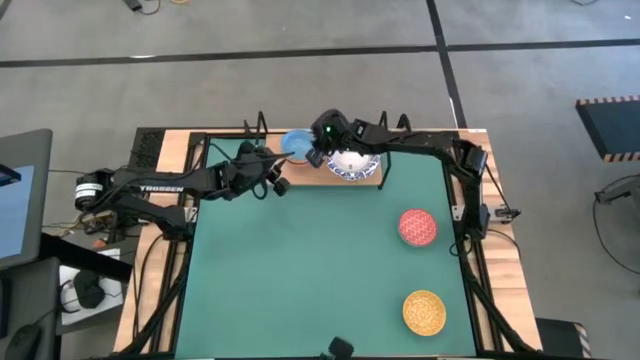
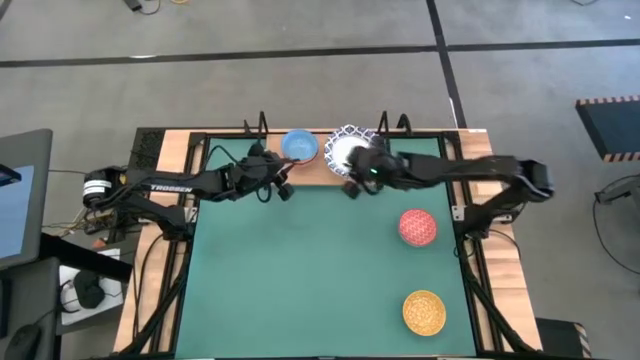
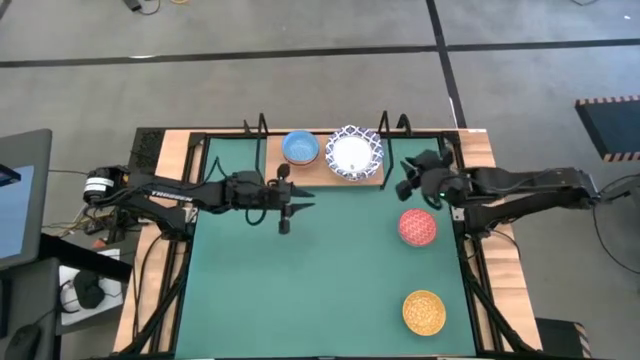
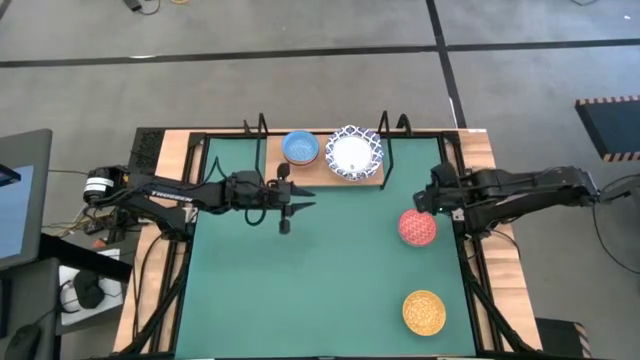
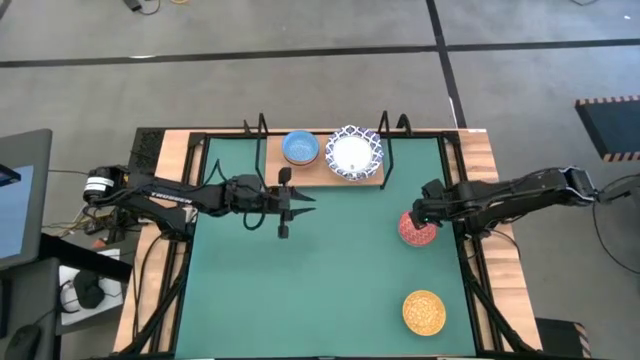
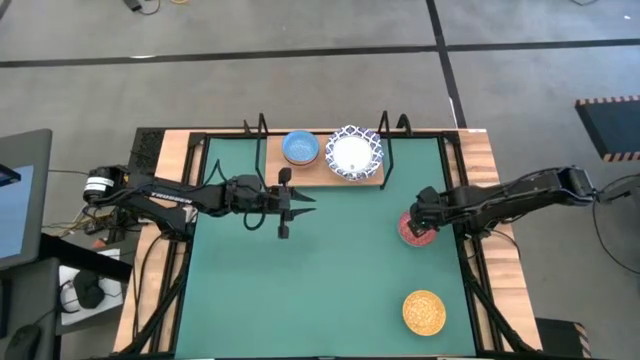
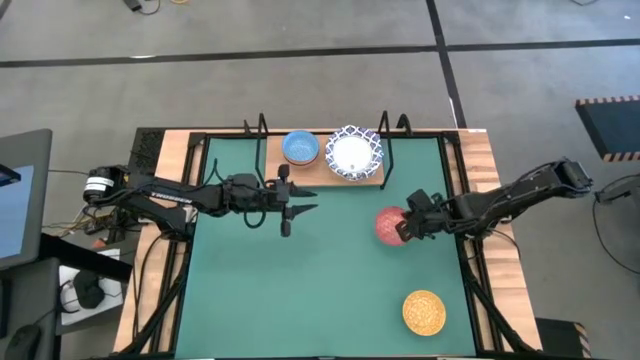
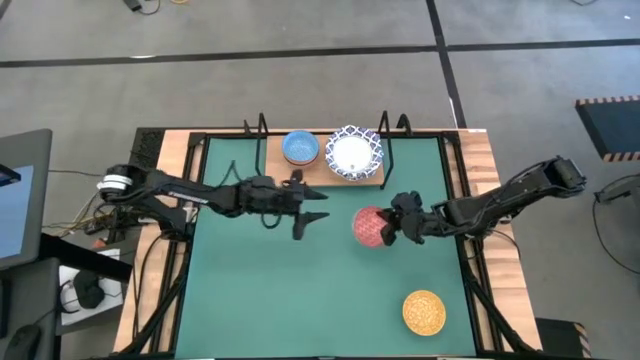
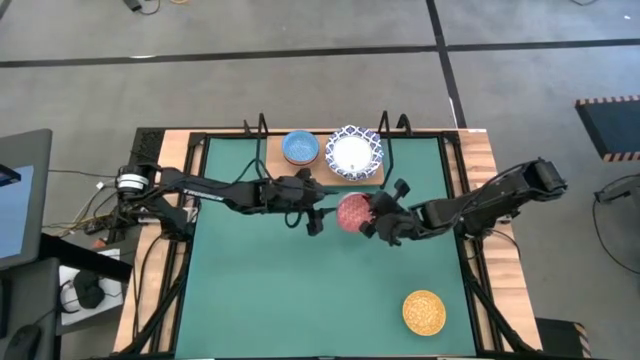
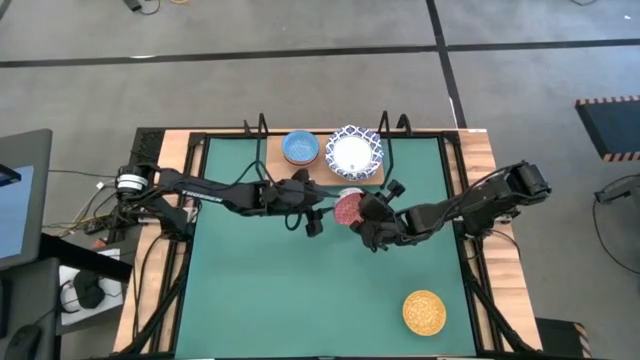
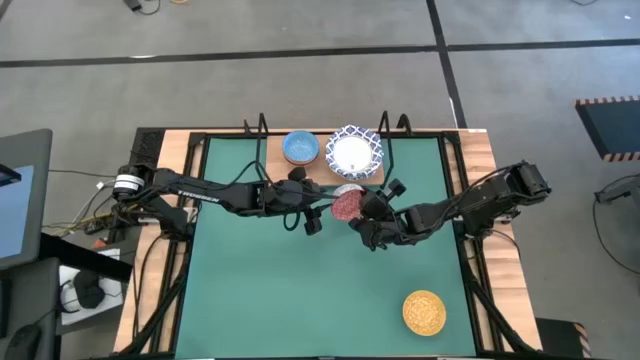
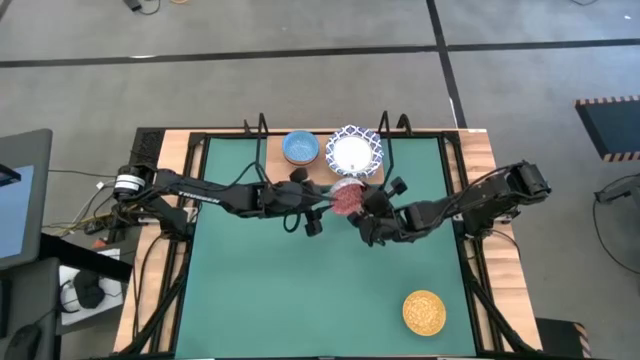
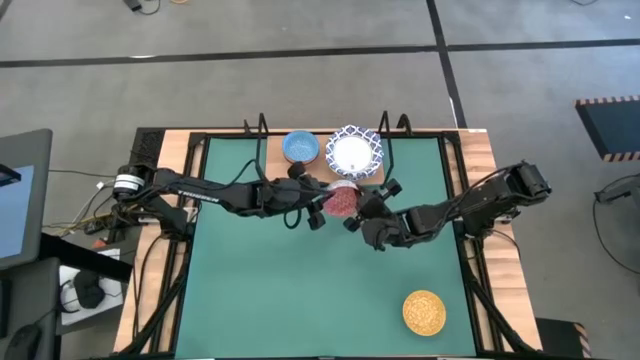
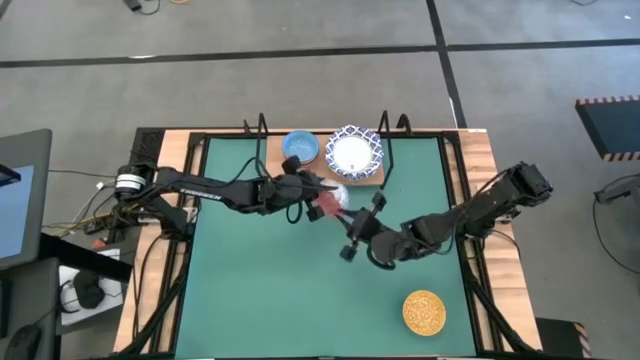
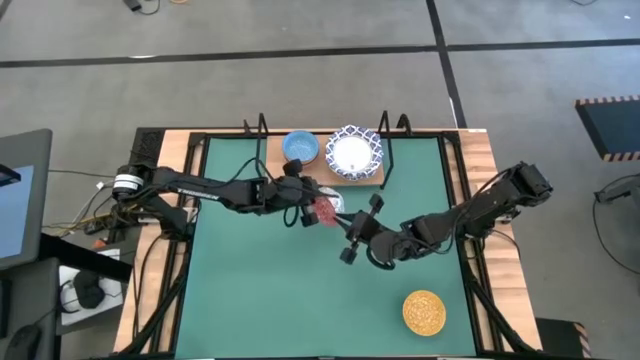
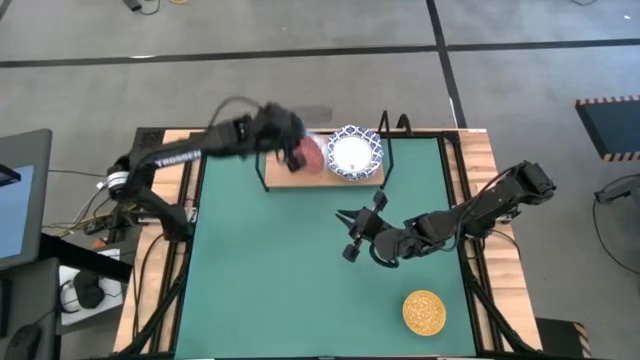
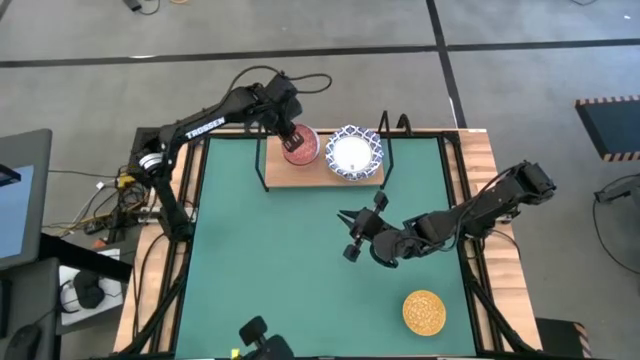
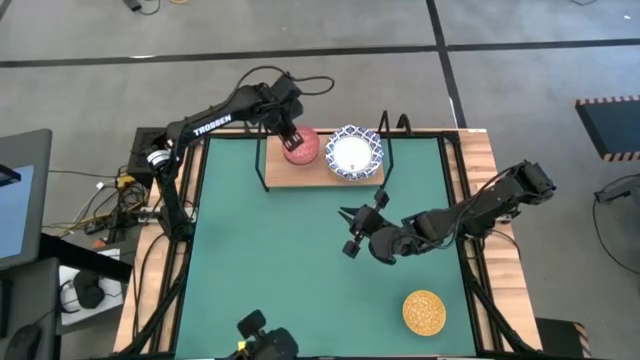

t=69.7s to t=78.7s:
Task: Place and stack bowls onto a shelf
Stack the red bowl on top of the light blue bowl on the shelf

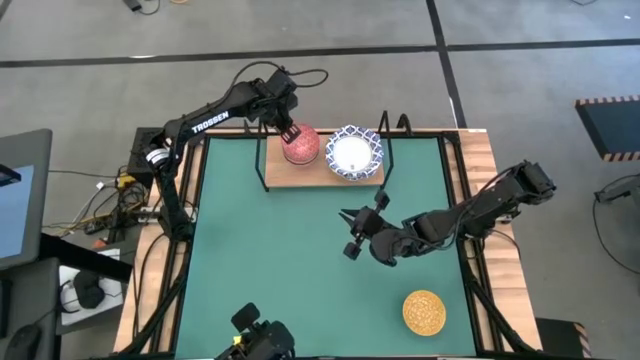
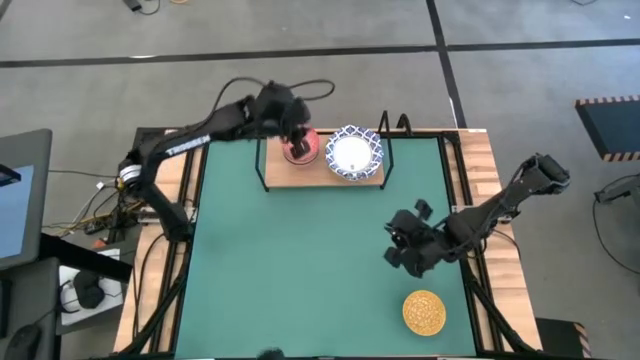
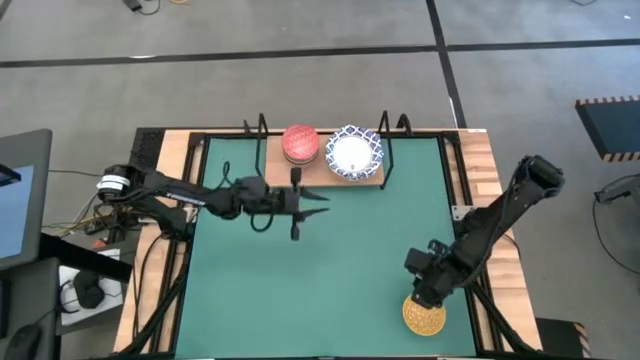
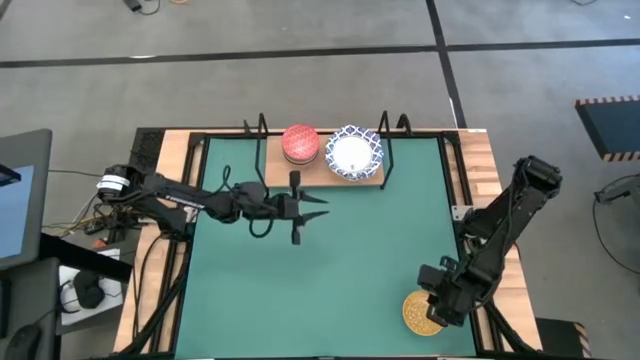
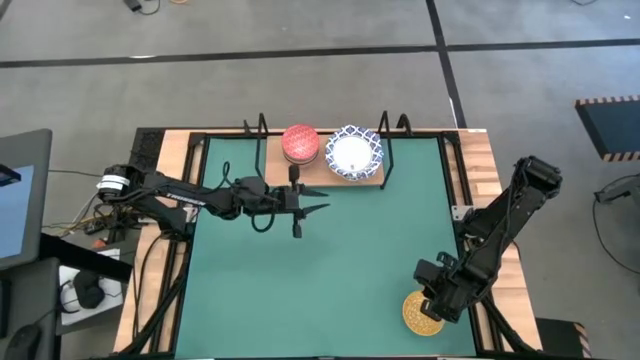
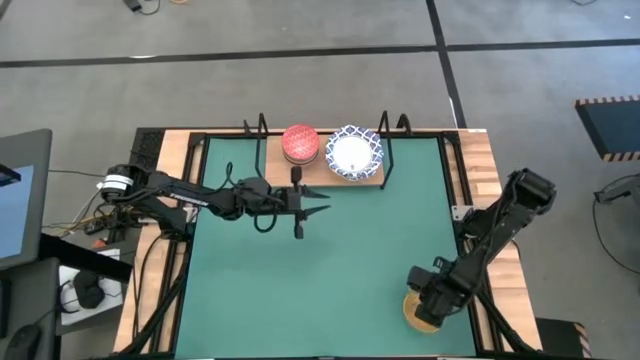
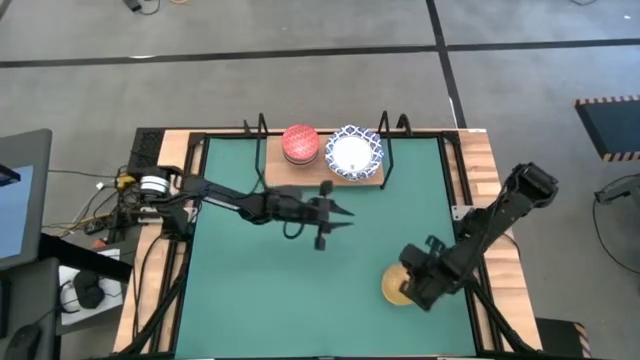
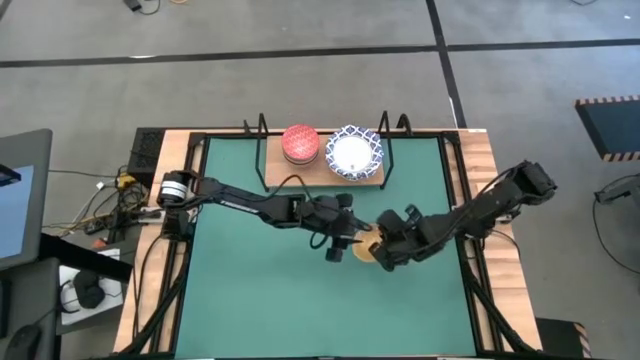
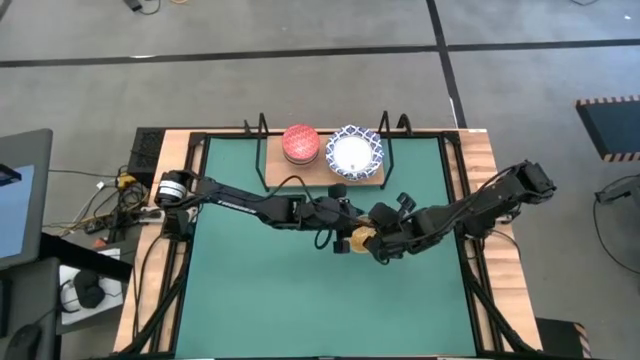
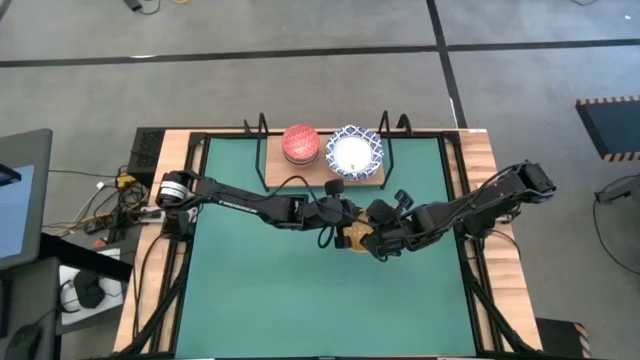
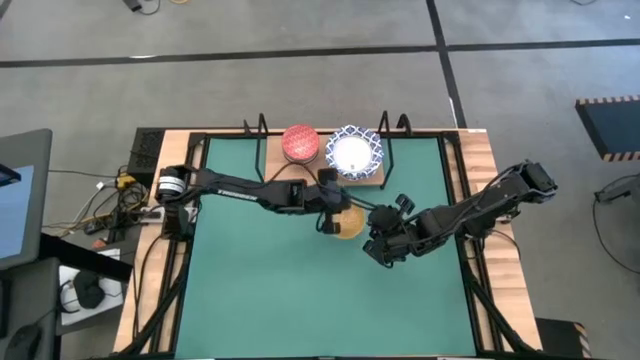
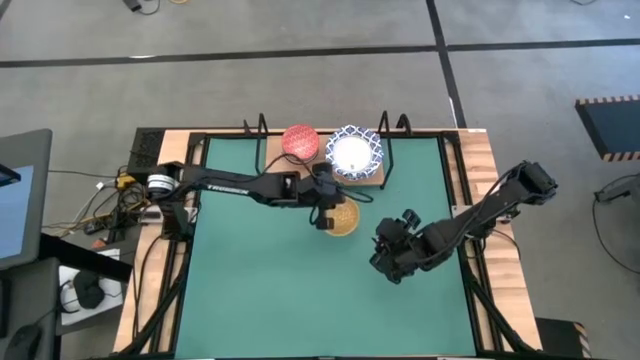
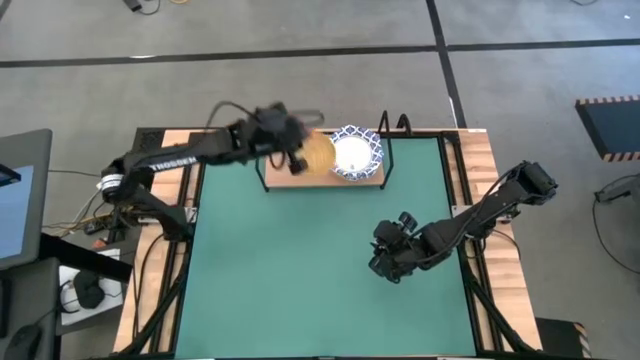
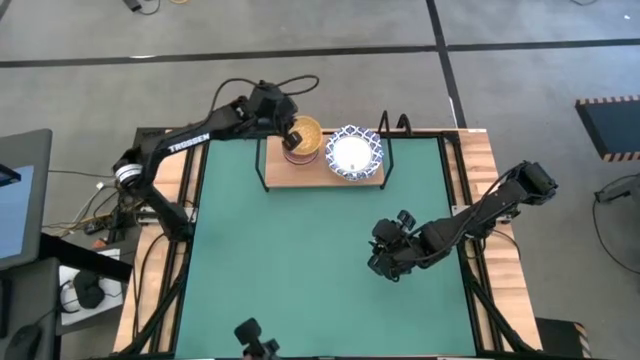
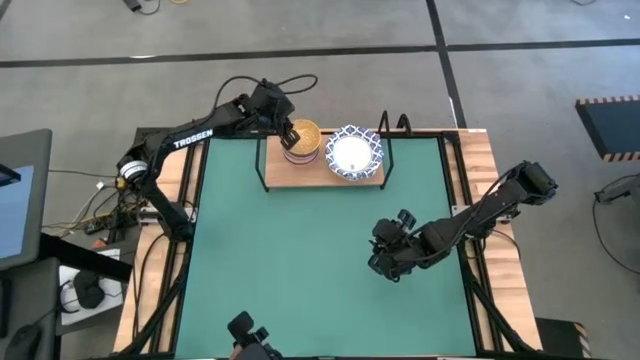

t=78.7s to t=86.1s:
Stack the yellow bowl on top of the red bowl on the shelf

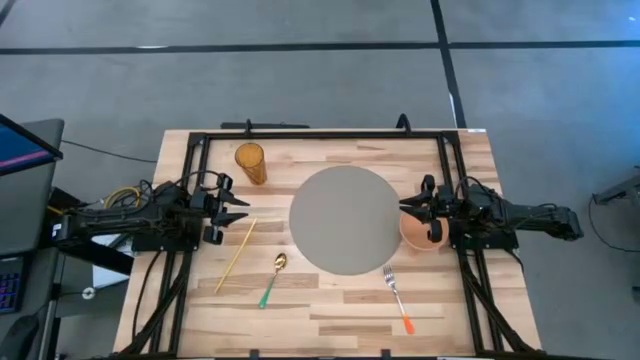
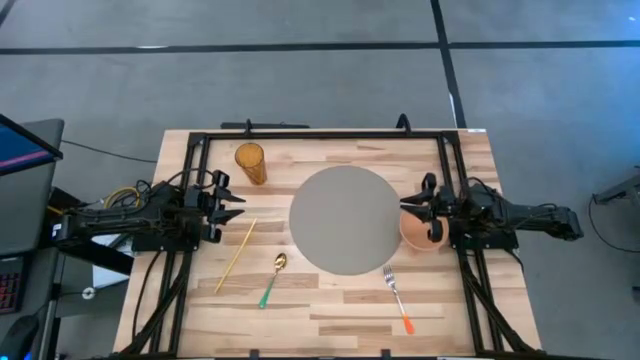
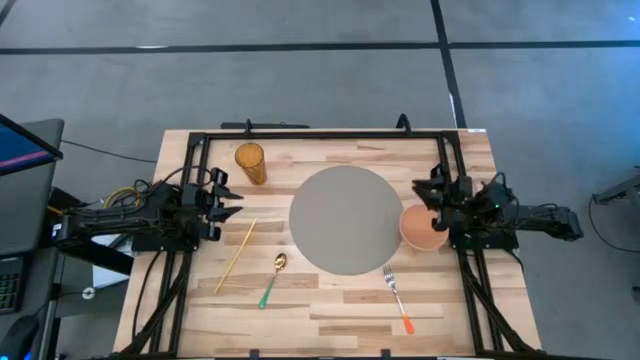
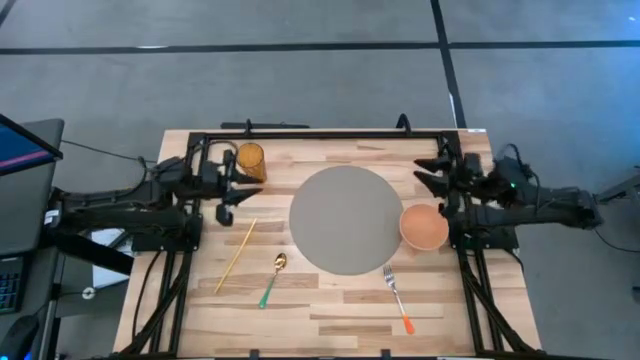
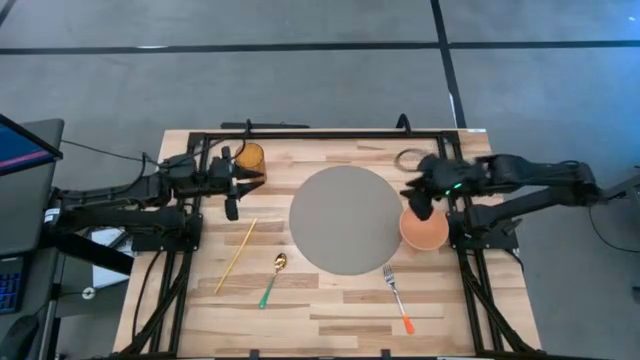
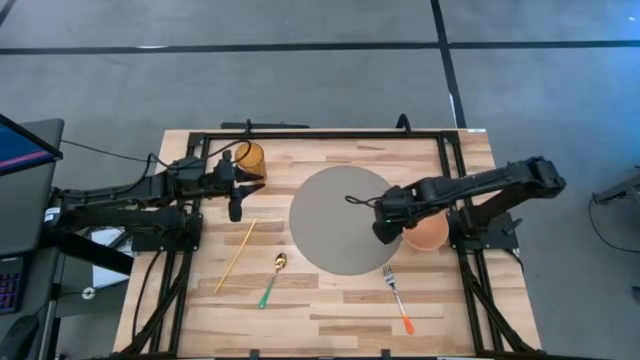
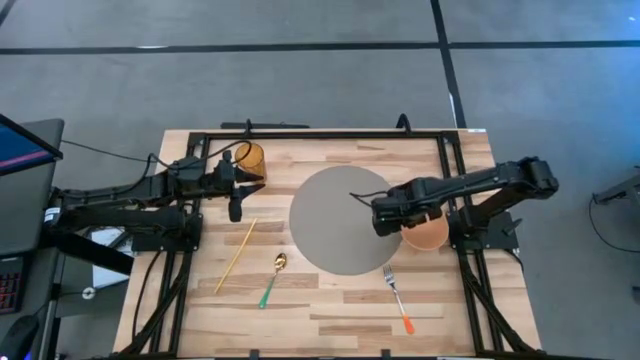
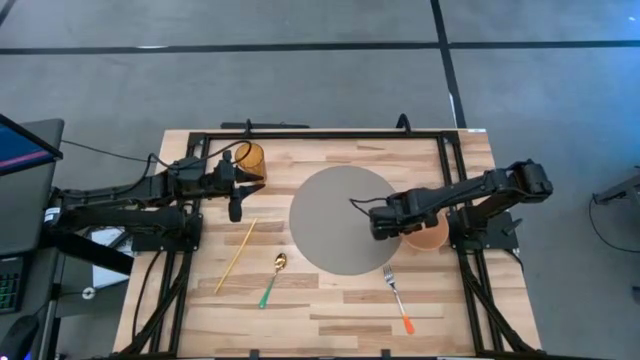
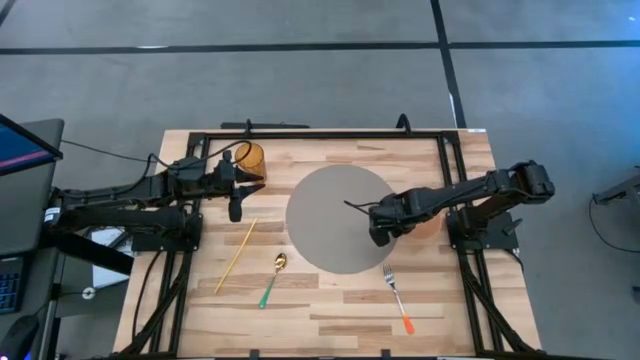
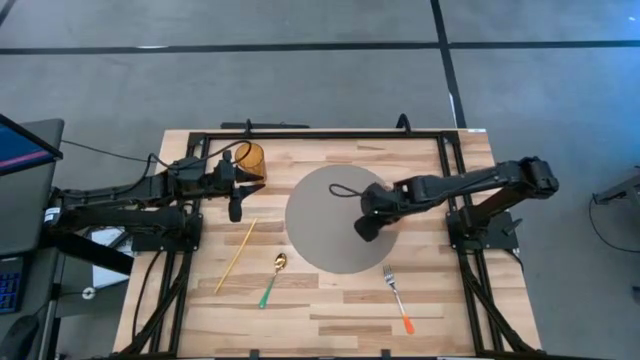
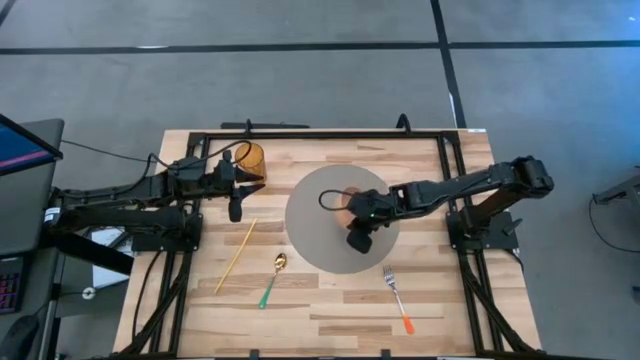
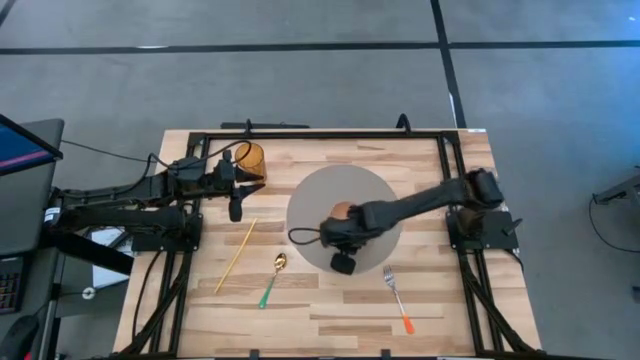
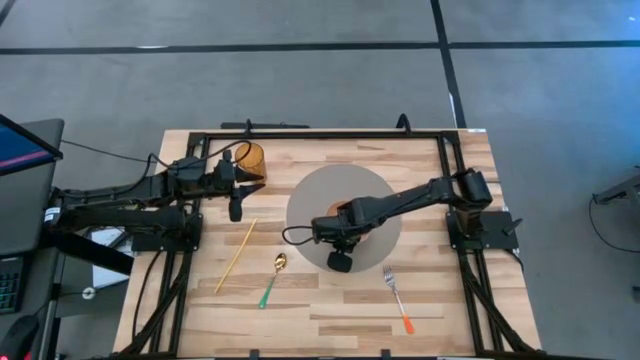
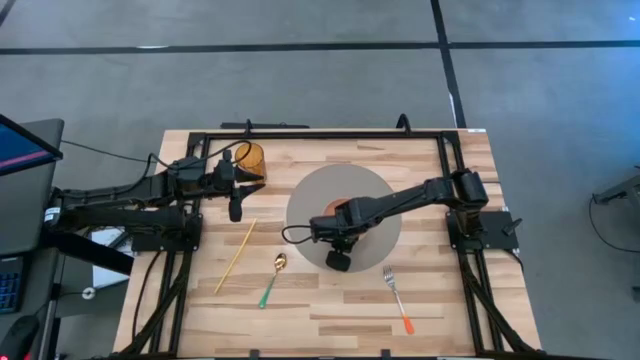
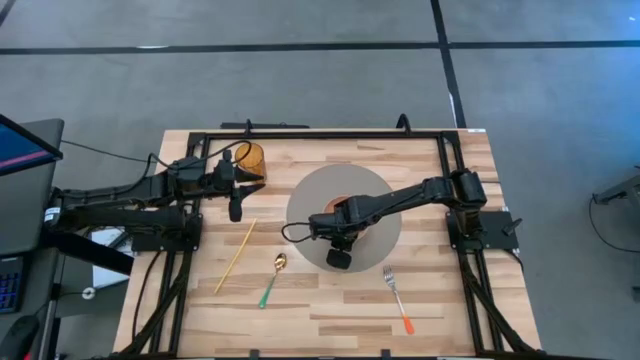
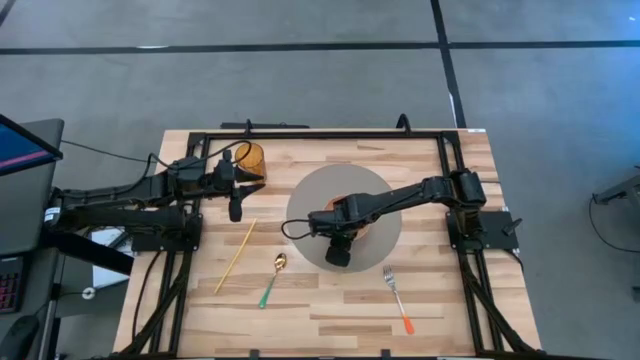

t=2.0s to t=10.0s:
Task: Pick & Place Utensil
Put the light pink bowl on the gray table mat
